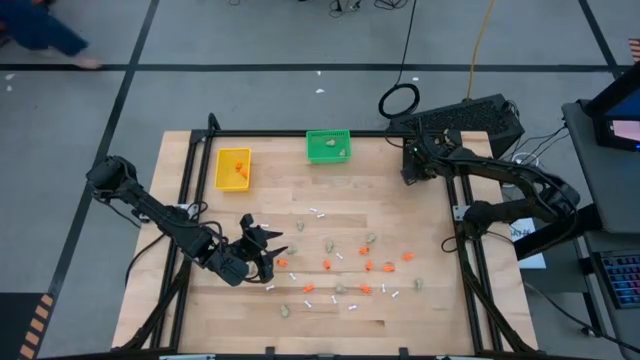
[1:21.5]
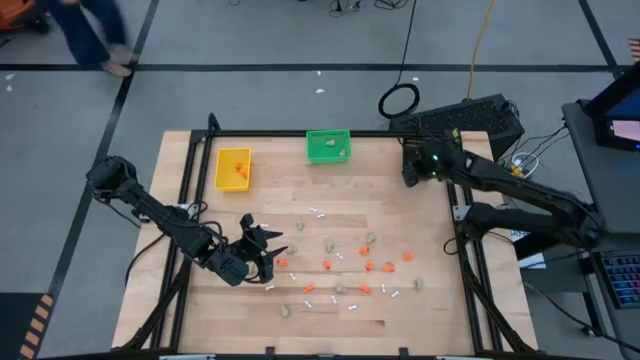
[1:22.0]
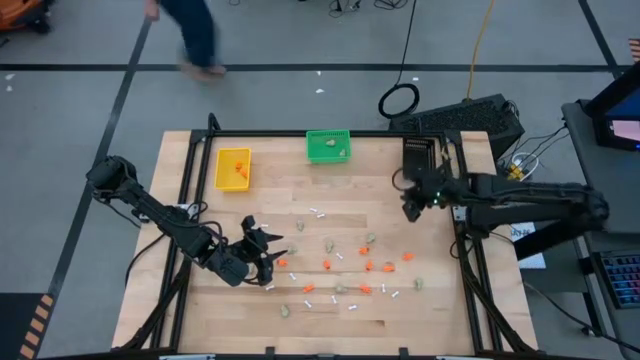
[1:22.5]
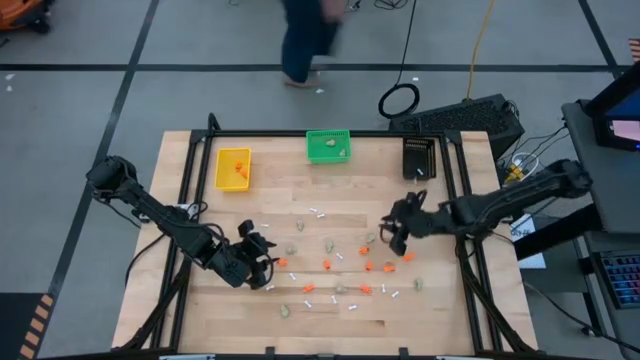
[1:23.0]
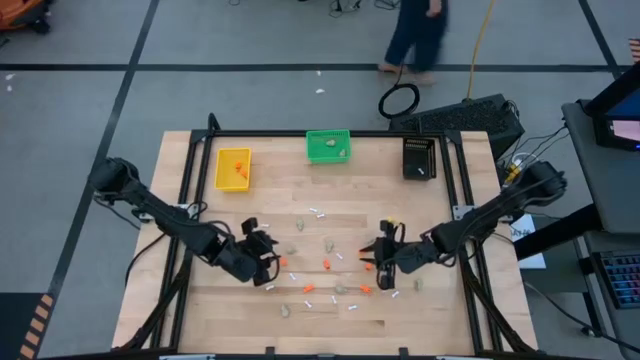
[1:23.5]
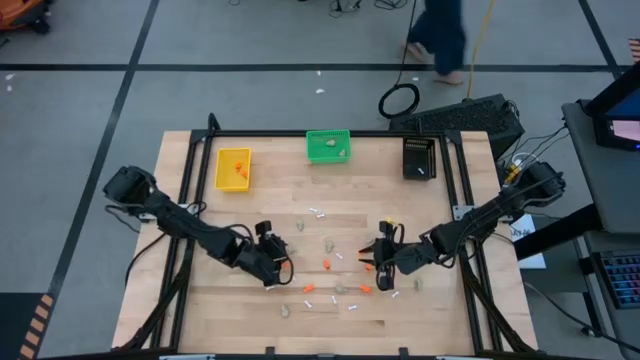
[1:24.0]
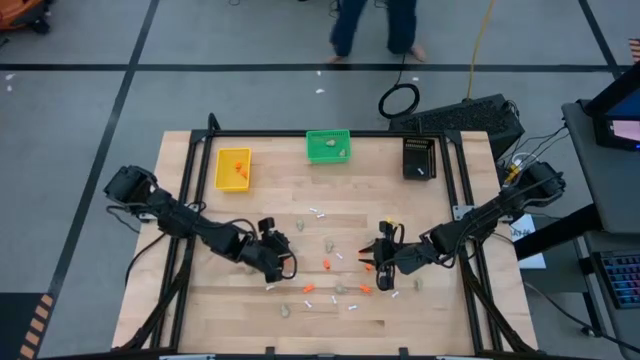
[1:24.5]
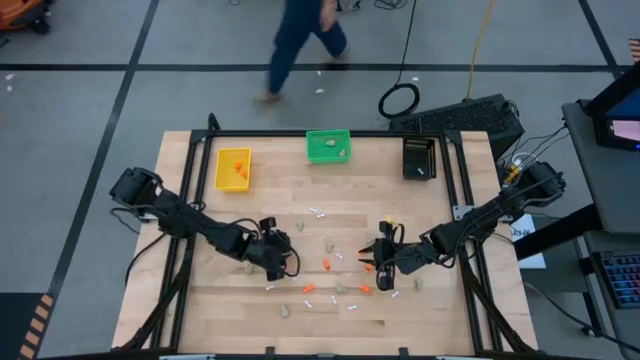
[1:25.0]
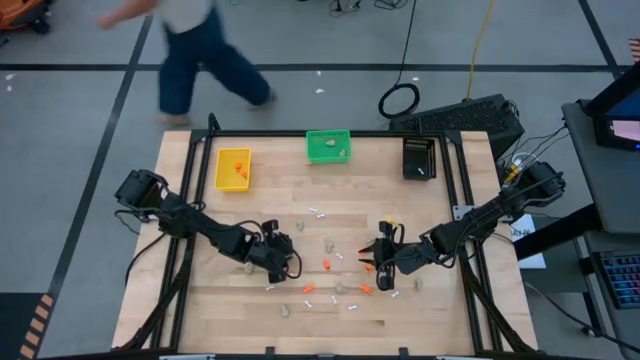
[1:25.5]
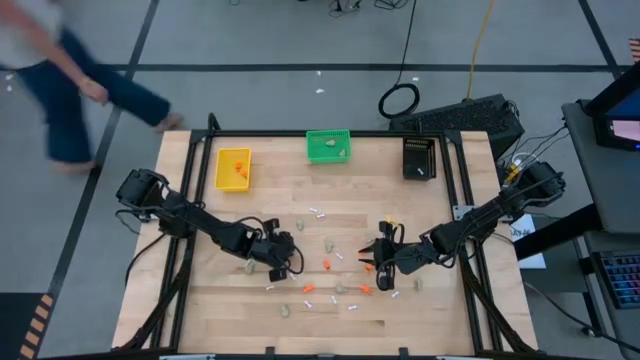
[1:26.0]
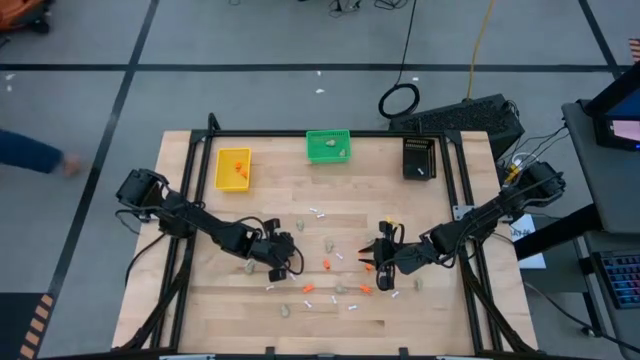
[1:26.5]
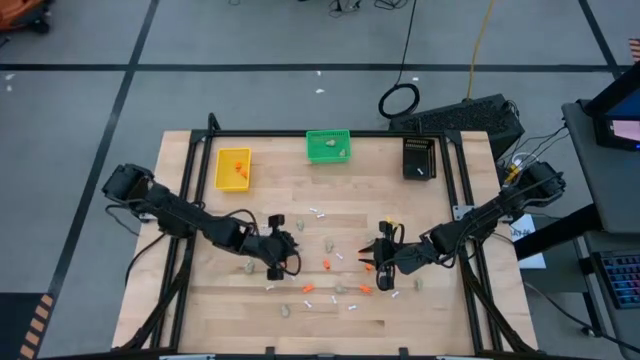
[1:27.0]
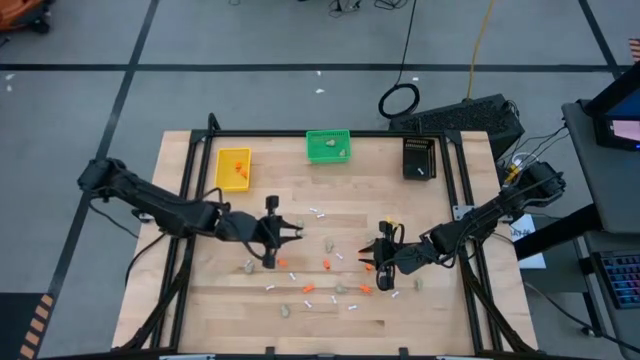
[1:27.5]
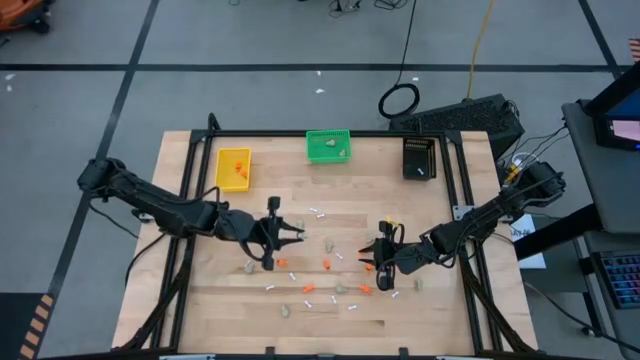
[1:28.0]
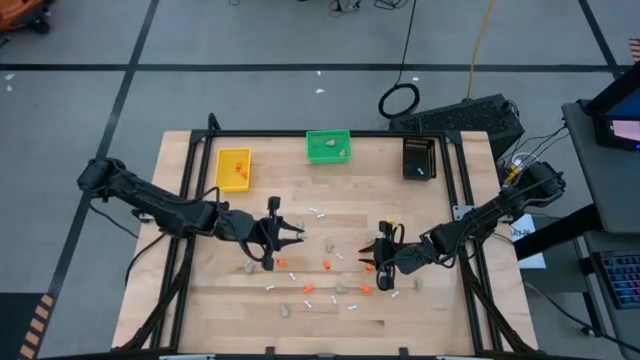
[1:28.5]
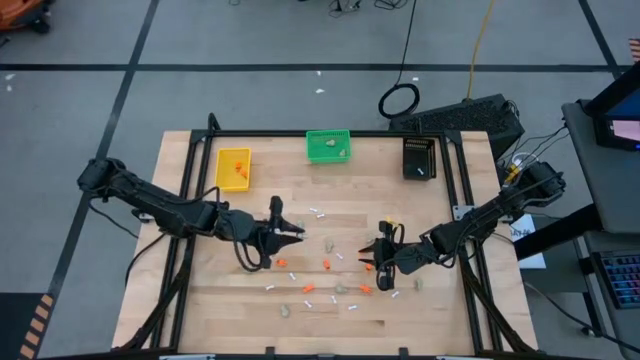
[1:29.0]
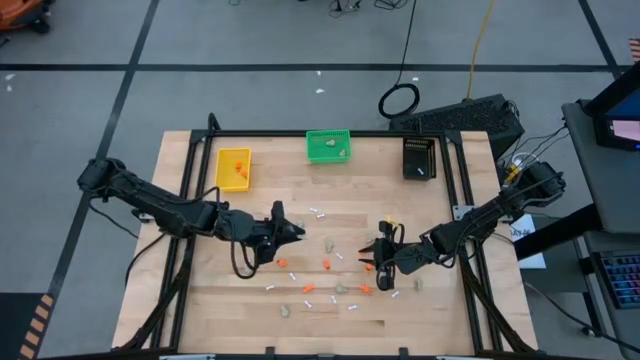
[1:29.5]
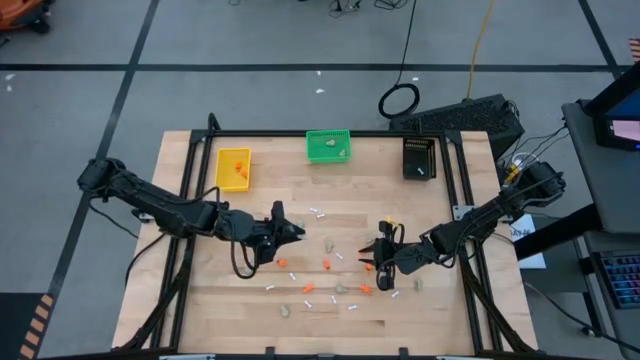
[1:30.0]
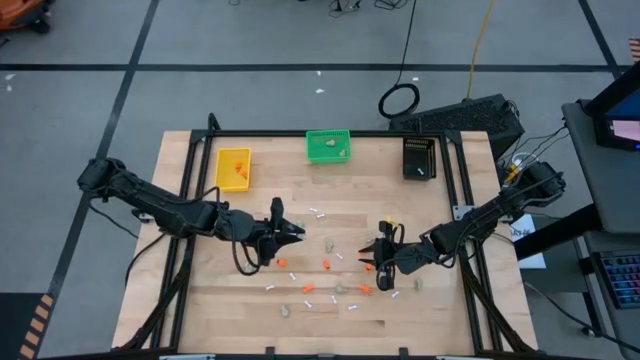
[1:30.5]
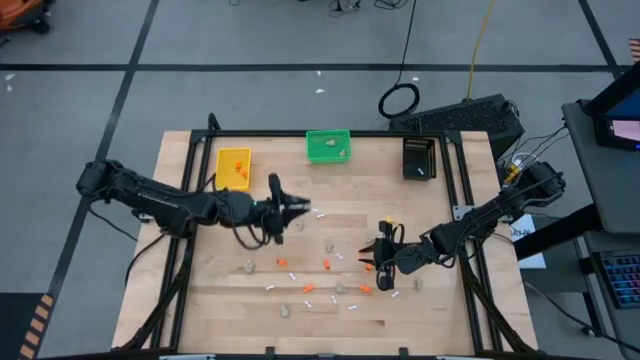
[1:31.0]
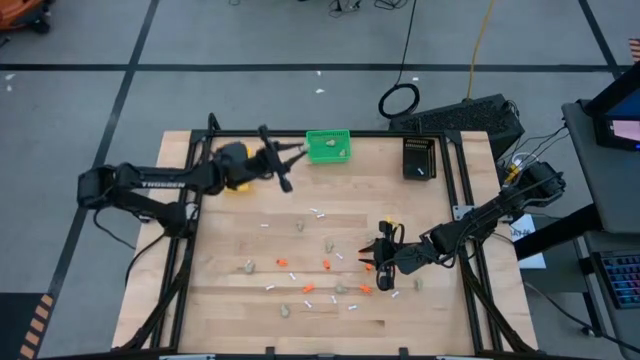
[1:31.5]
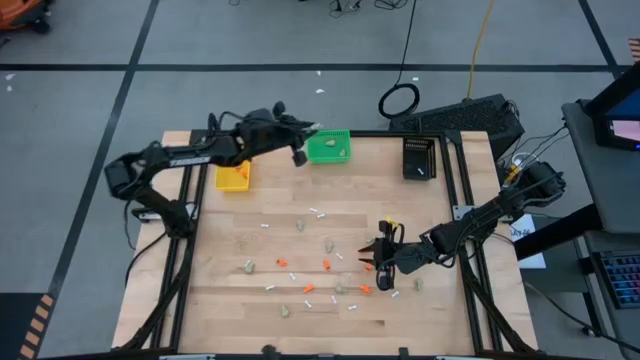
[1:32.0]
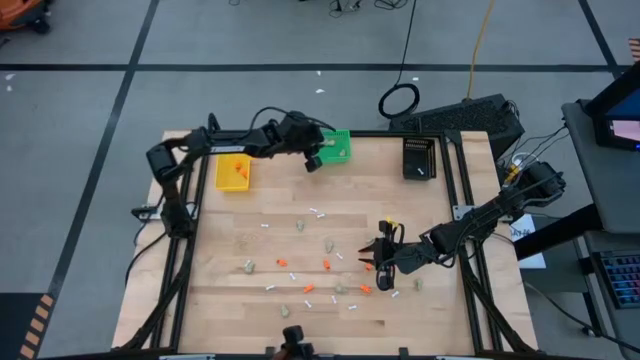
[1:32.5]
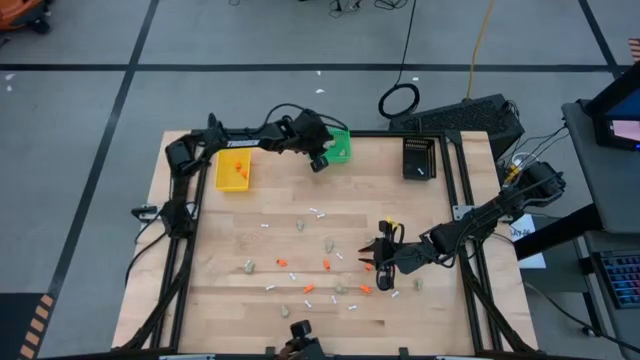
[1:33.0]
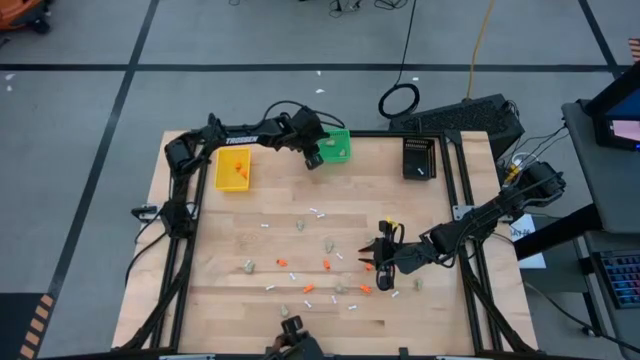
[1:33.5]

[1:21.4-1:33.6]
Task: Sort Halloween decoration
Put the gray skull toy into the green bin

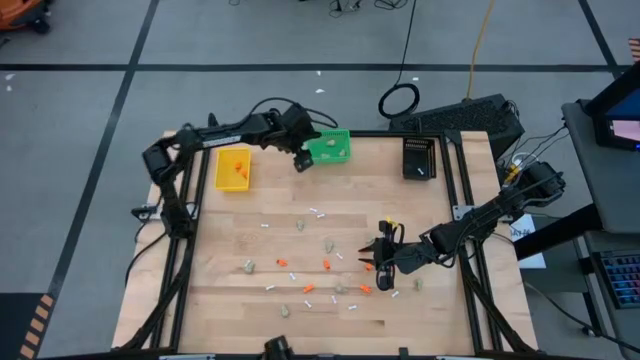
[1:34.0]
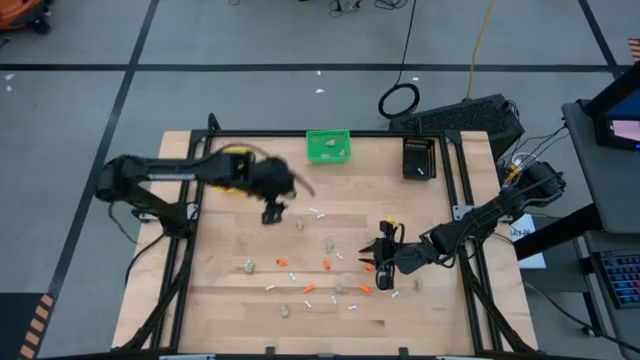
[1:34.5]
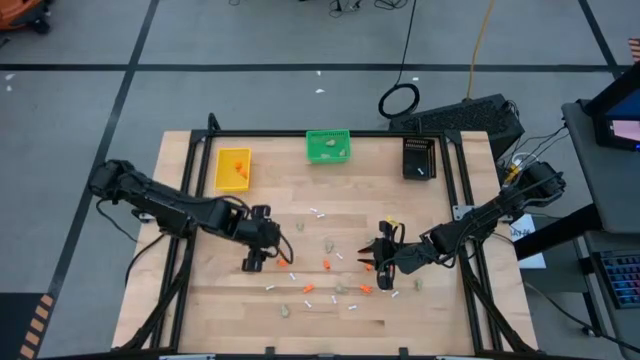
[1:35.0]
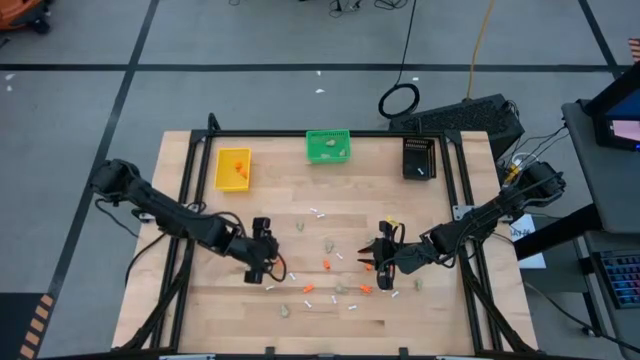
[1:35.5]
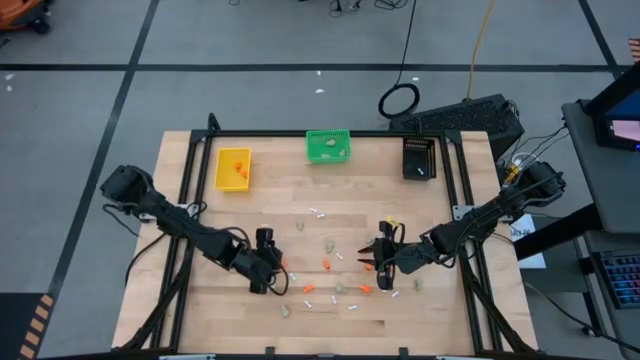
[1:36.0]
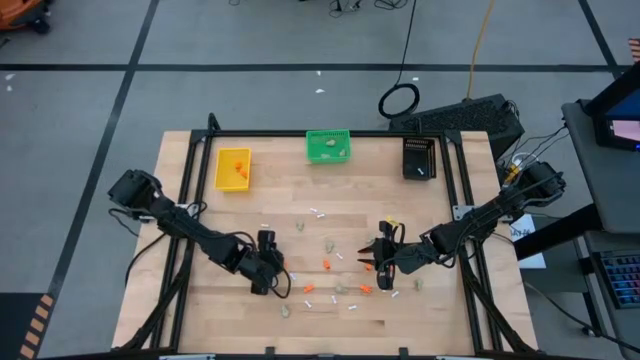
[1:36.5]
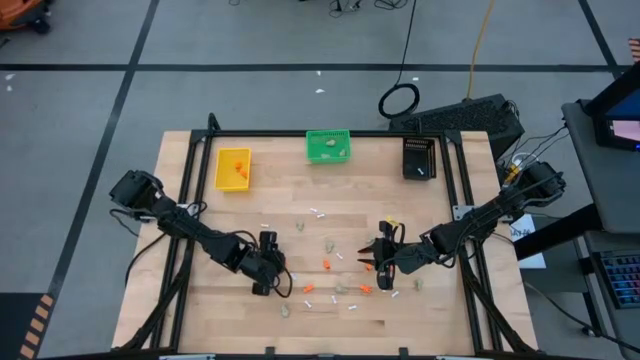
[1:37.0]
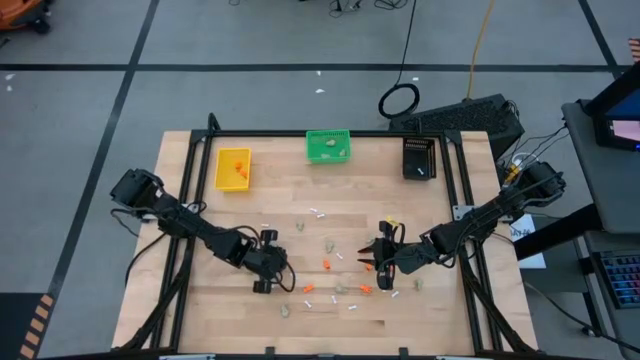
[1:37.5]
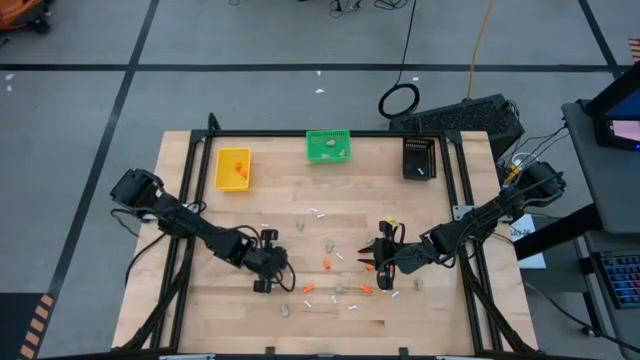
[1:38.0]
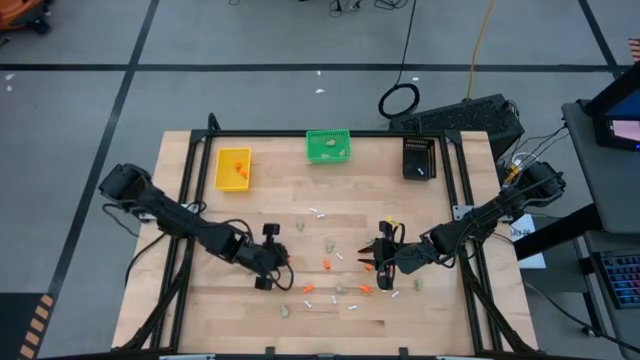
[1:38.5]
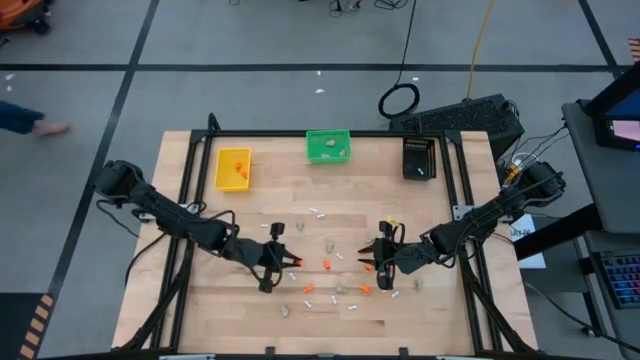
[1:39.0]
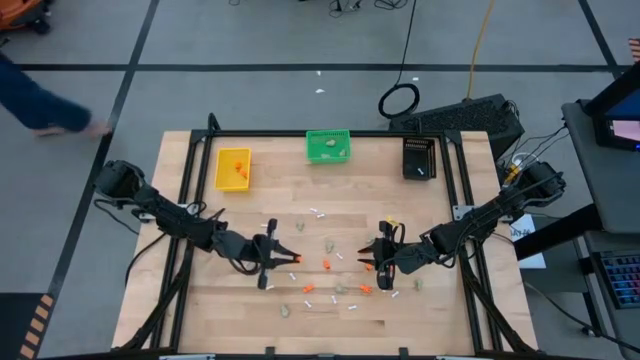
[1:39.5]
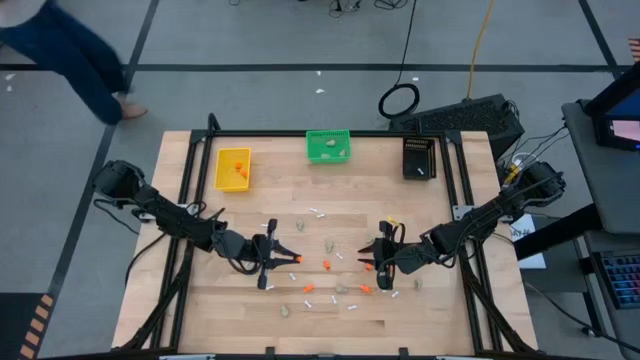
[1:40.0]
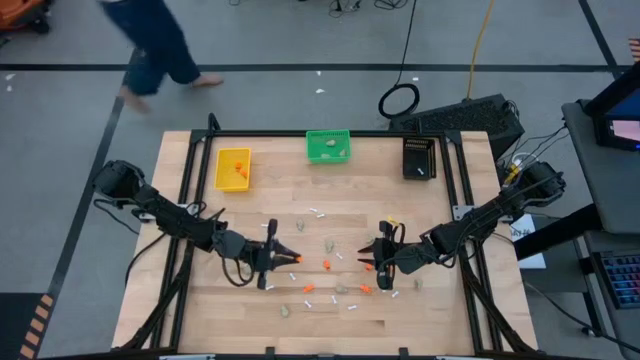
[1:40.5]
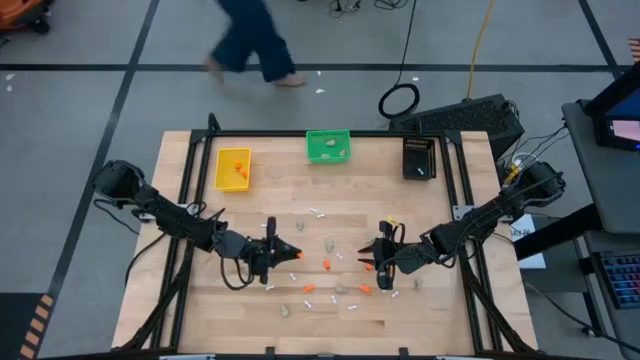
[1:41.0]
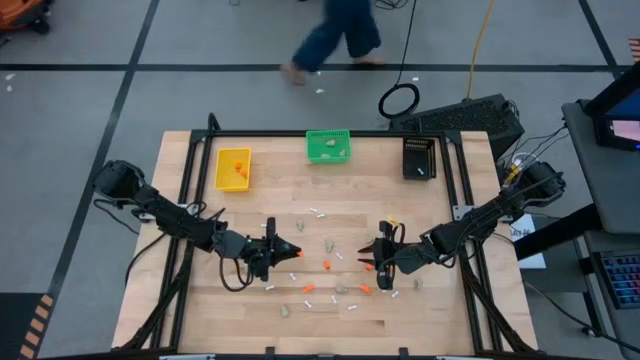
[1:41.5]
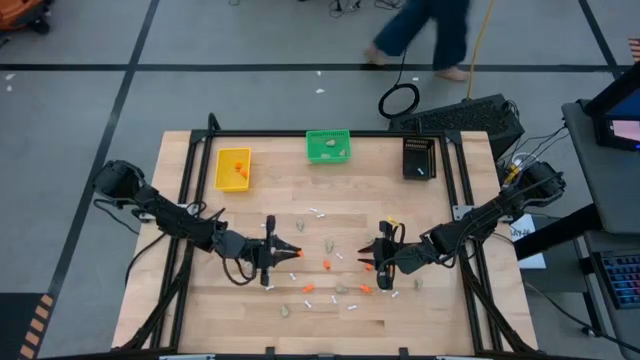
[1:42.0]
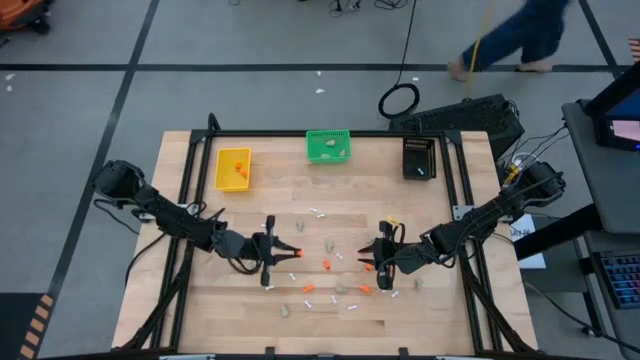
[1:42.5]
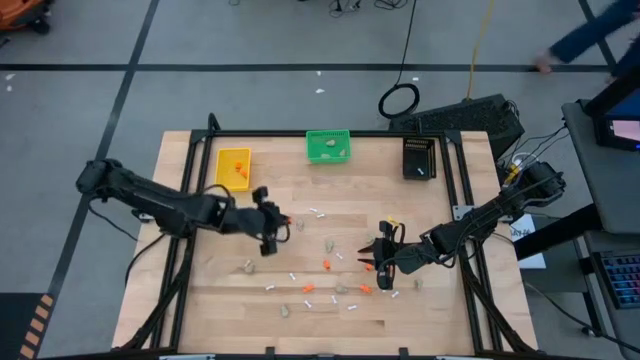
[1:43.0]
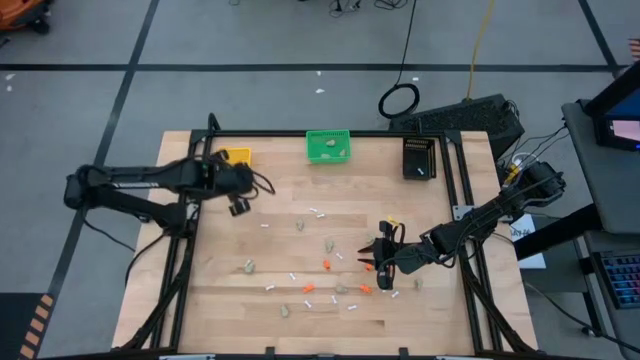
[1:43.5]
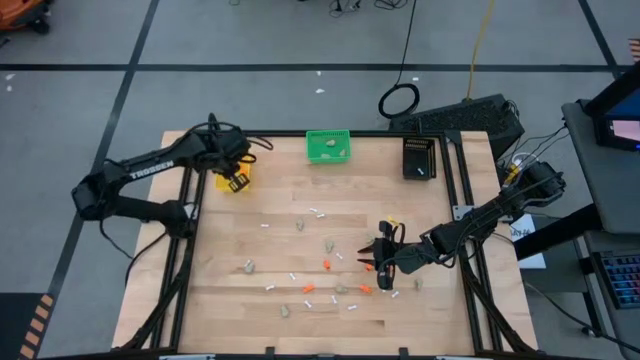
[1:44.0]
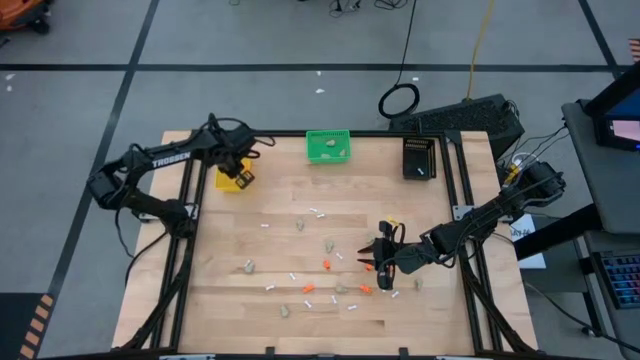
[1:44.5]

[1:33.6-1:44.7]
Put the orange skeleton toy into the yellow bin
